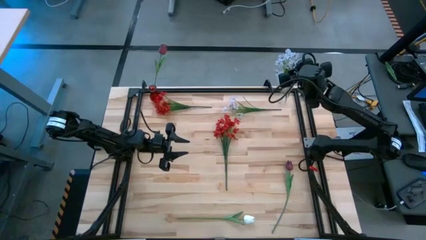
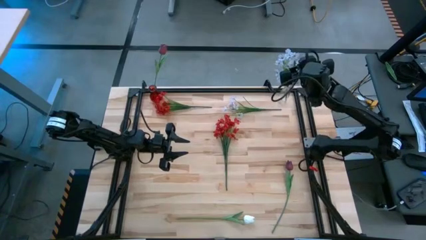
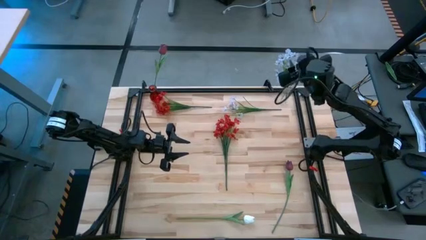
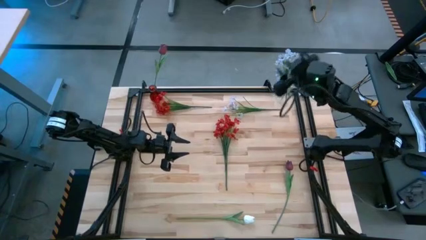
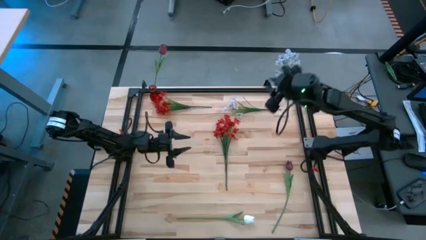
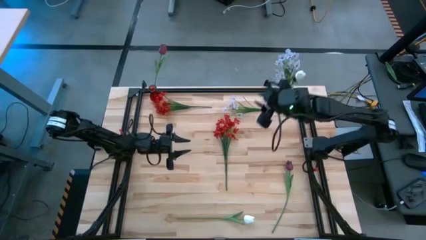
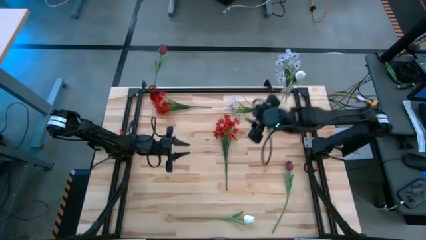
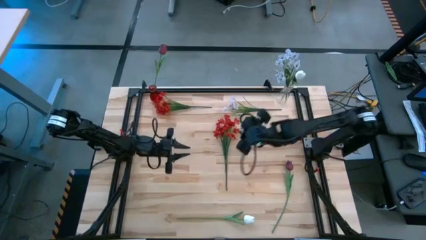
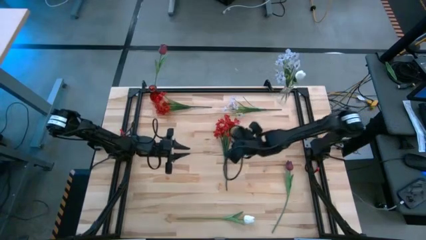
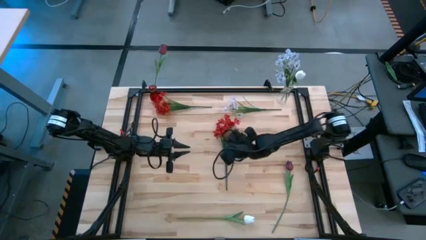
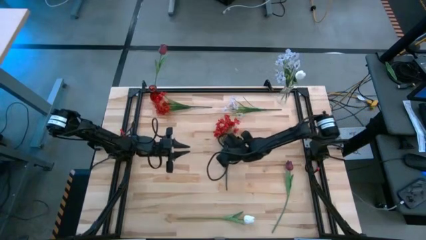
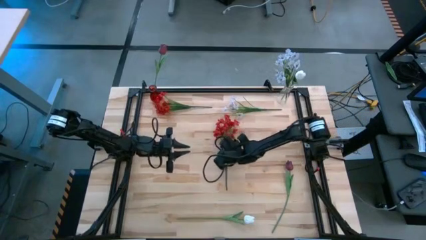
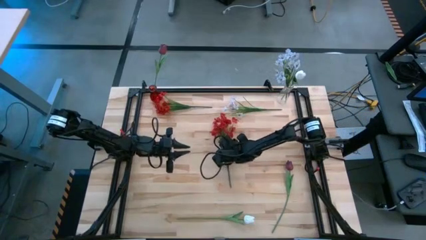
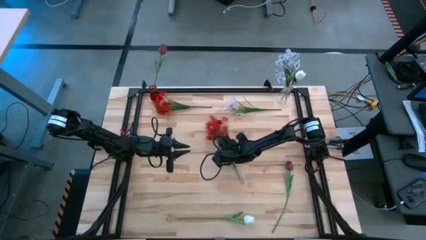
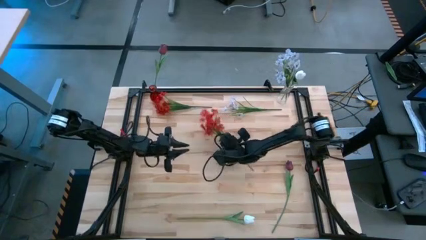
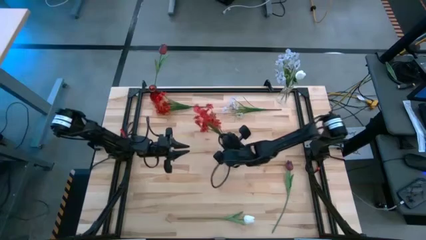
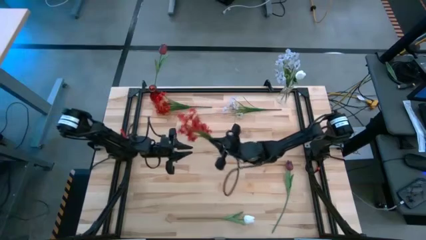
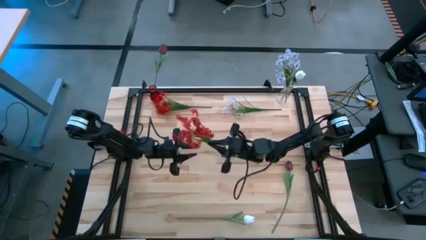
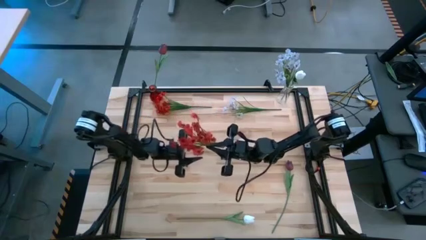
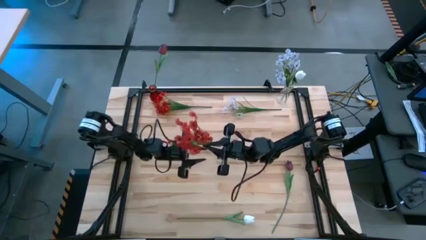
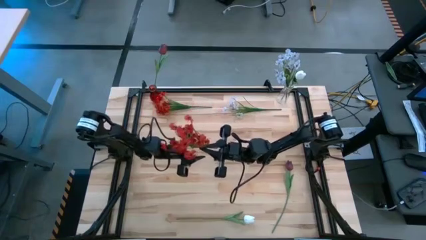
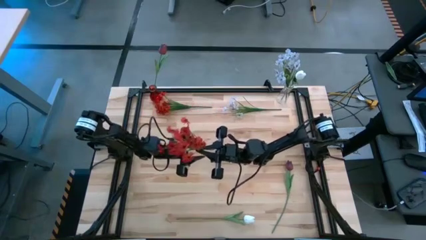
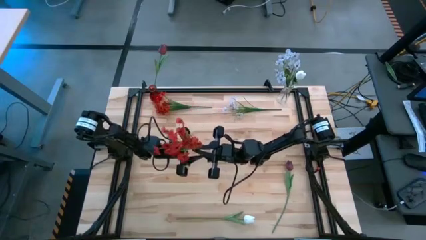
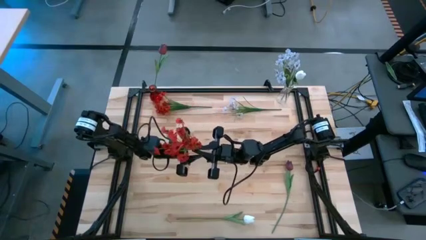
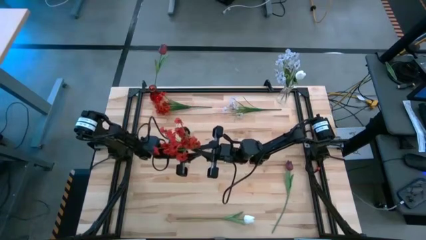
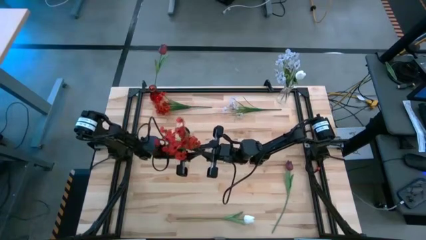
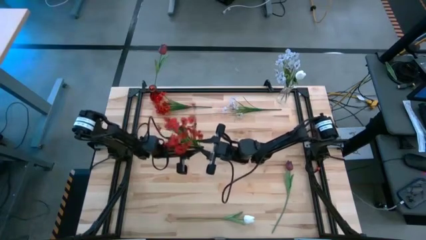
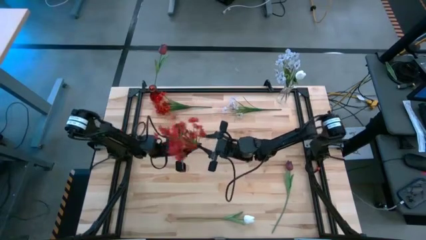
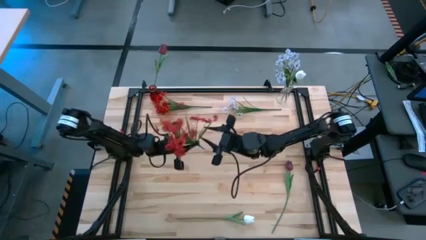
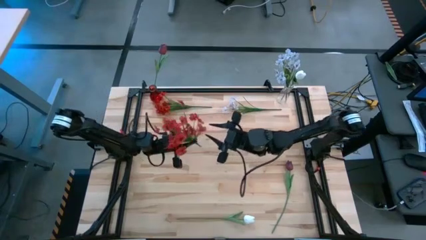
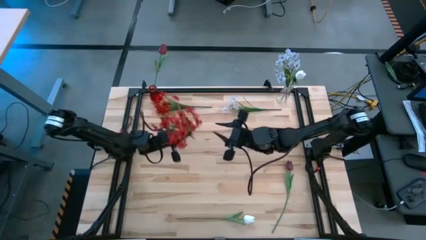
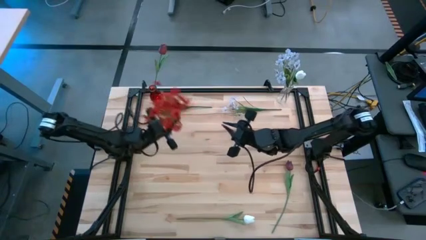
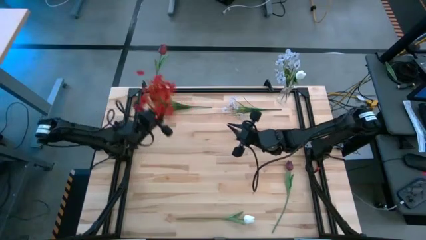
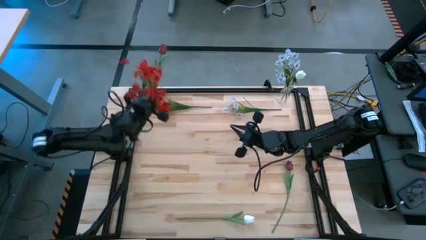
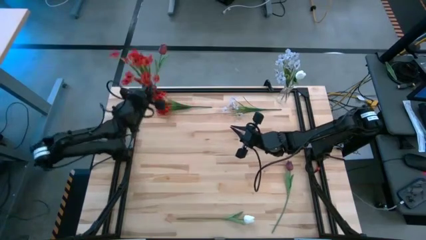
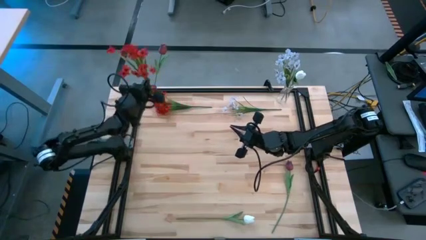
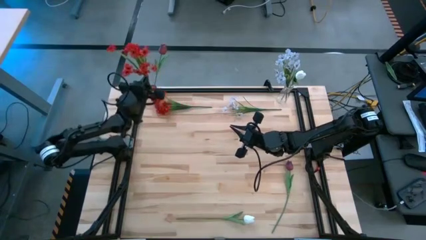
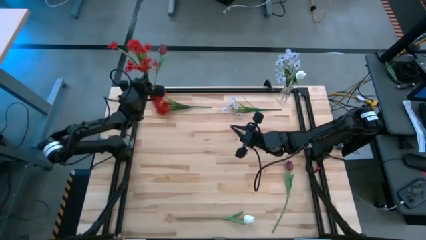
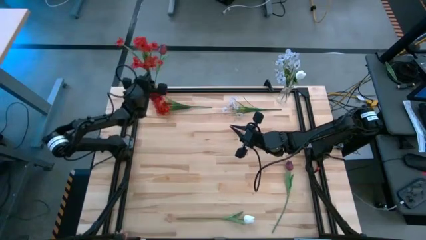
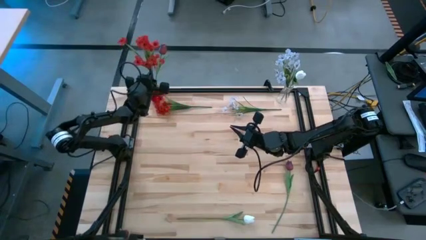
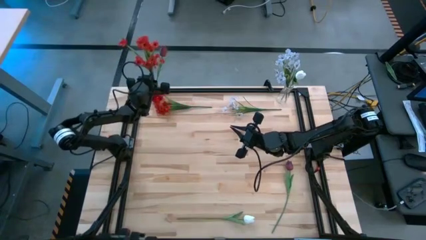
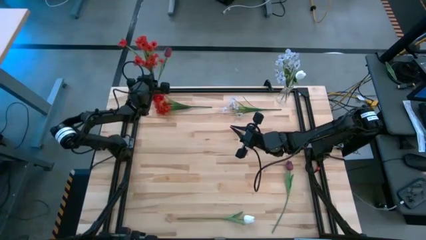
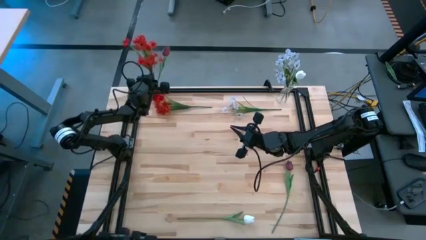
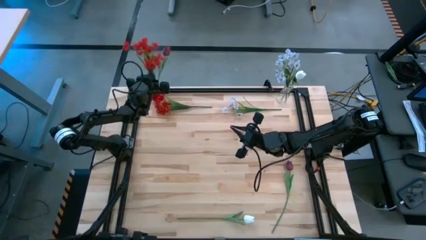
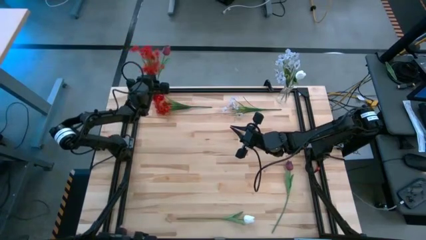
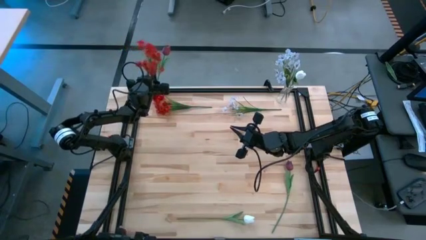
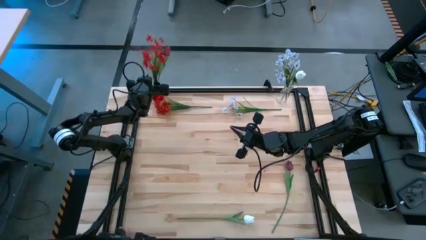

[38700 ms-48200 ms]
Task: Sort flowers into vase by color
Put the bottom red flowers into the red flower vase

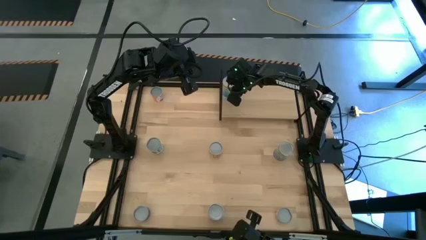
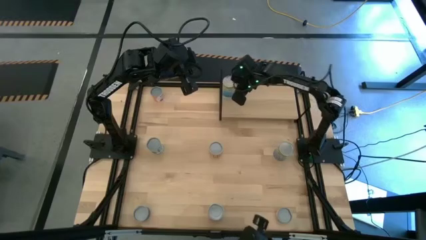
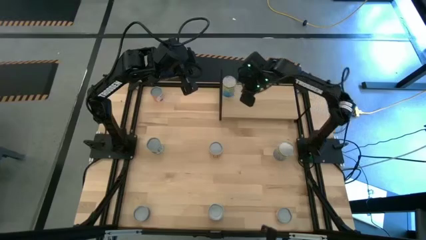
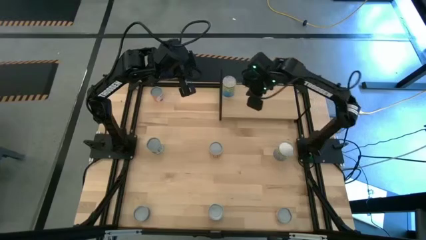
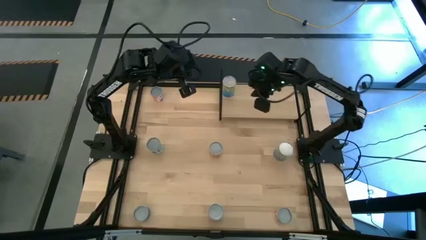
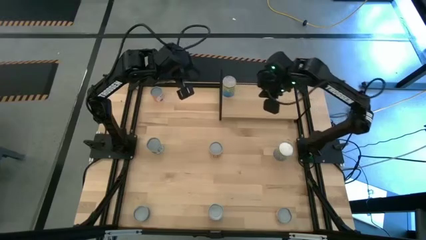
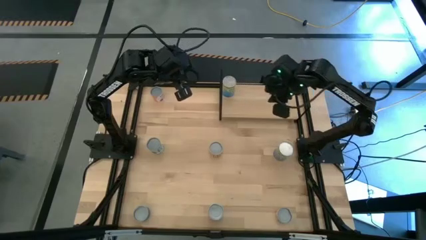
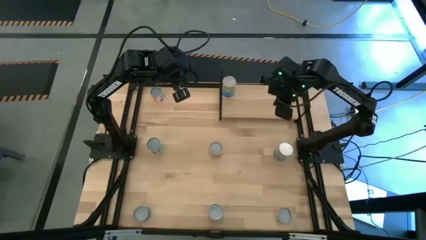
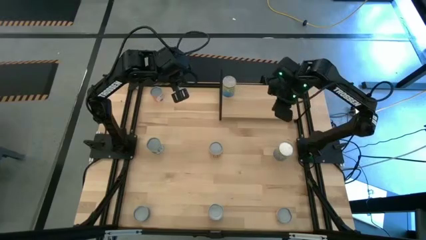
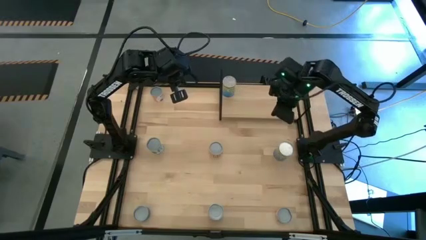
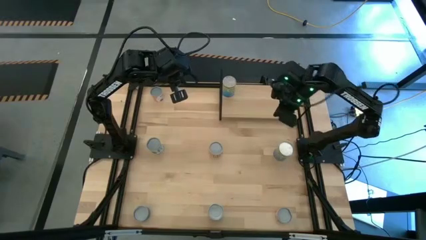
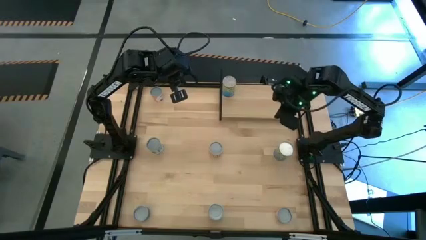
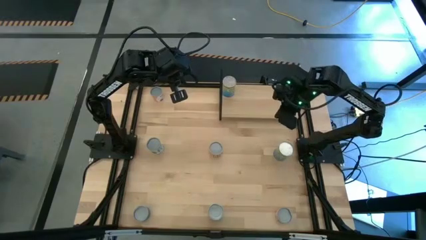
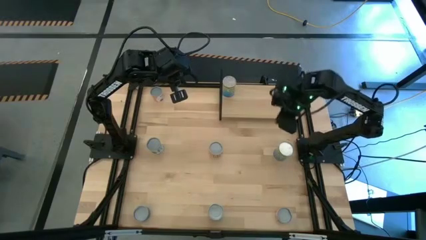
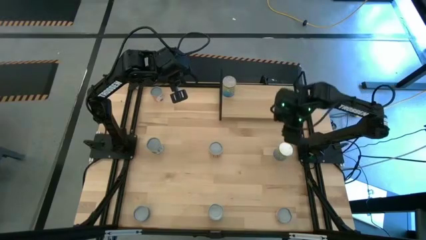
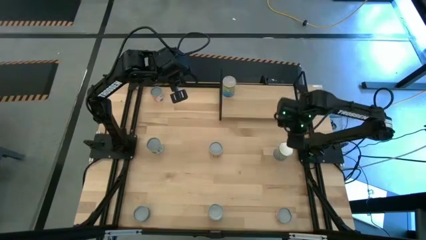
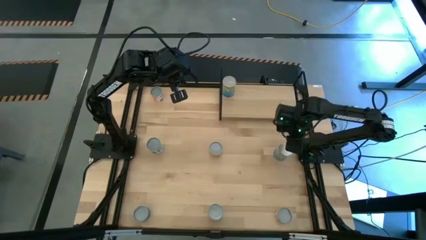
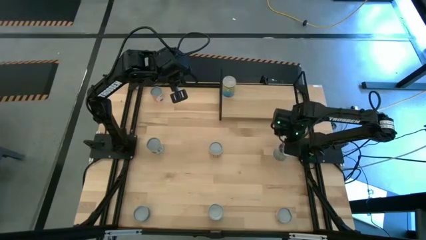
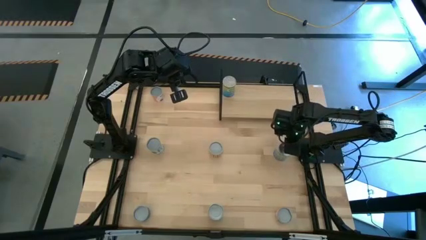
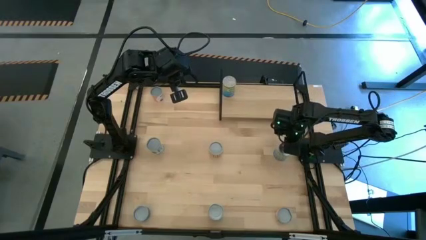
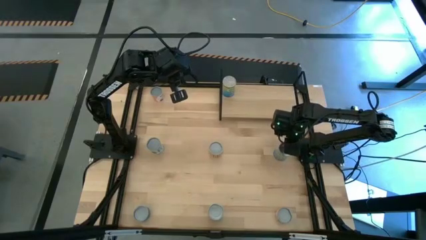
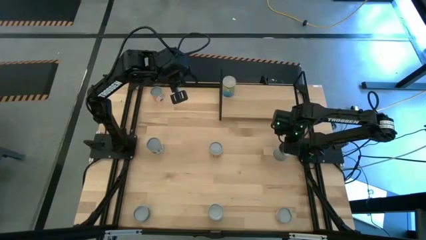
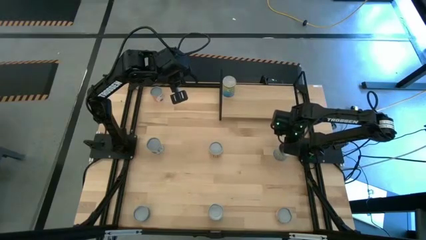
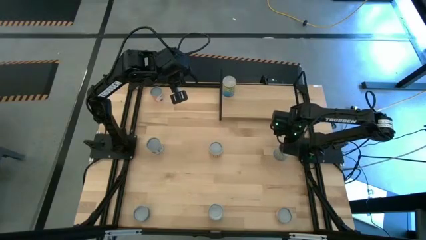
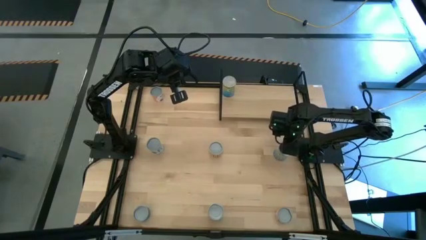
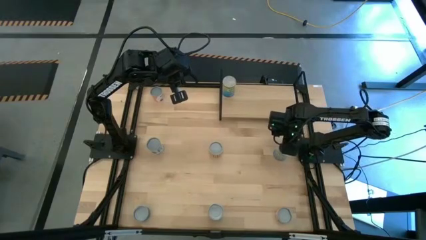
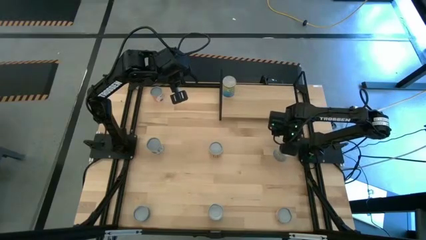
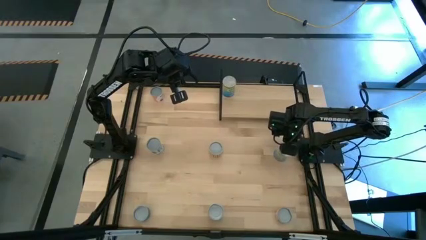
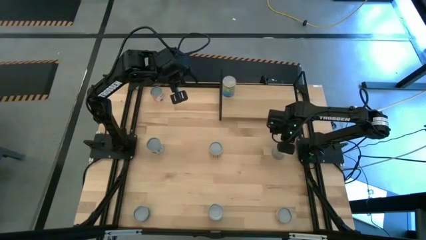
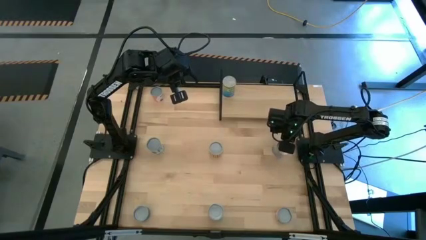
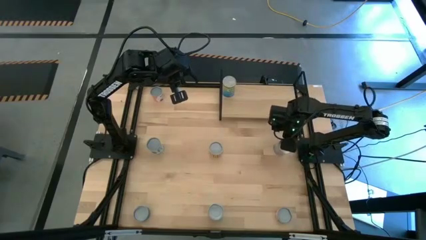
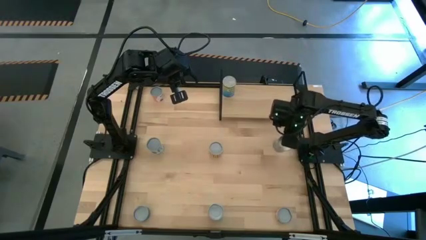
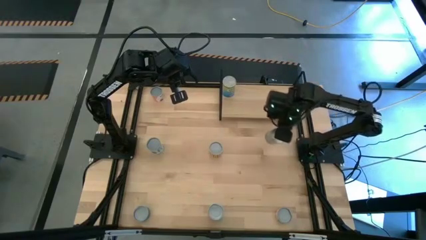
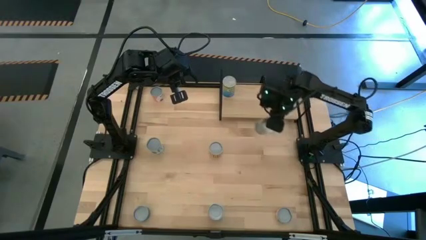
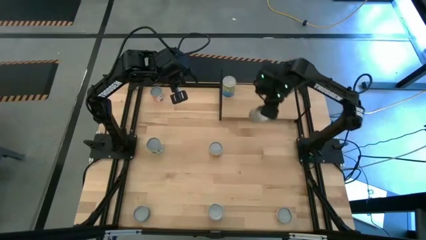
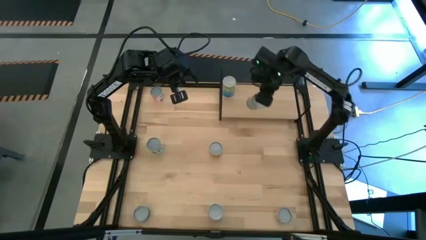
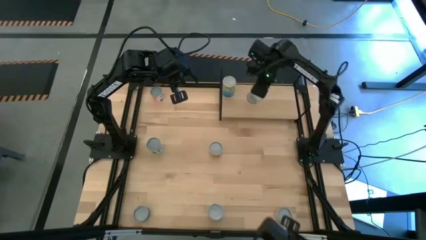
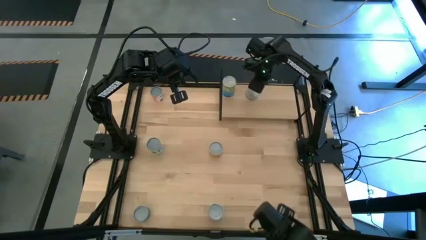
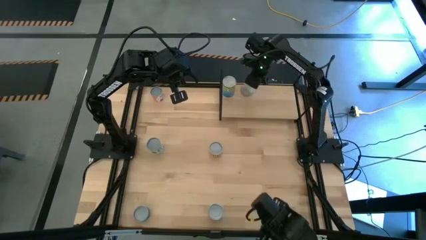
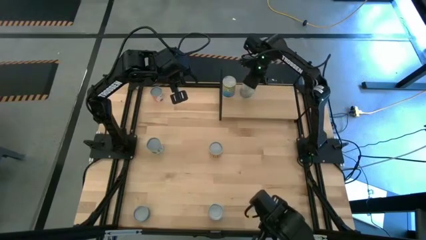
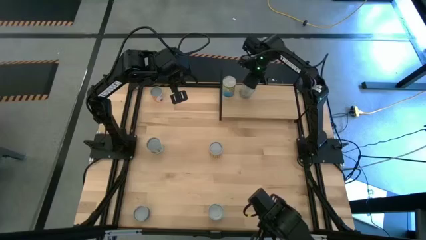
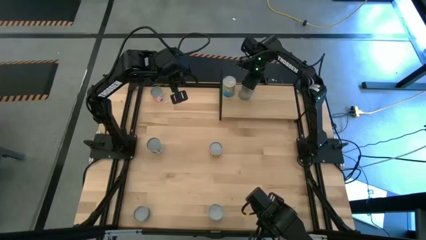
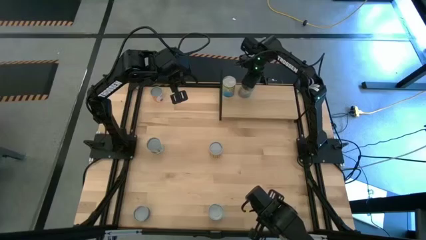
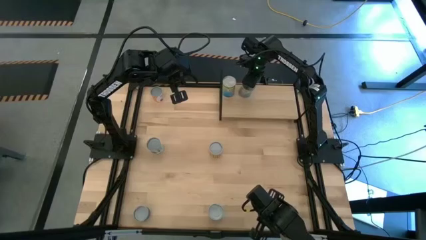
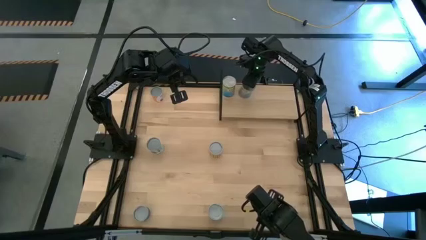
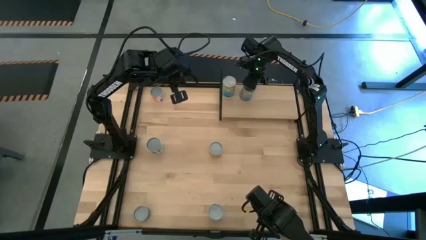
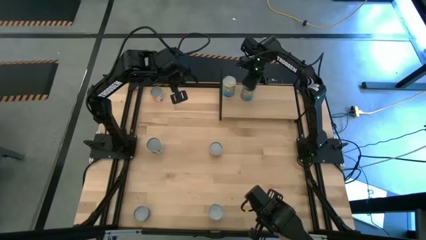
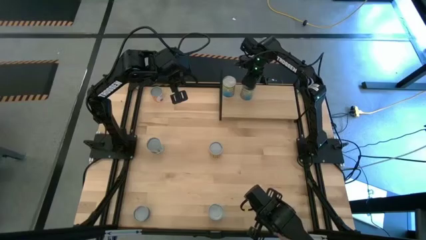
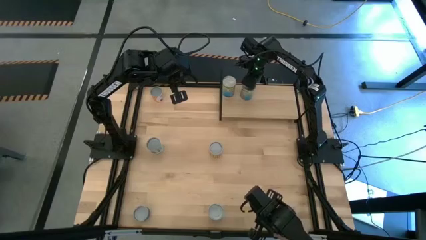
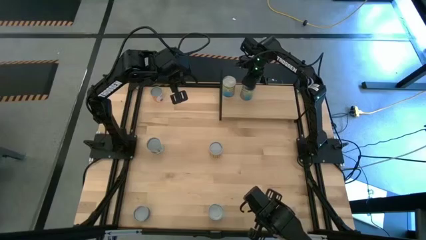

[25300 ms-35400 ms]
Task: Pick and place cans onto a shelf
Put the canned cherries on the shelf
